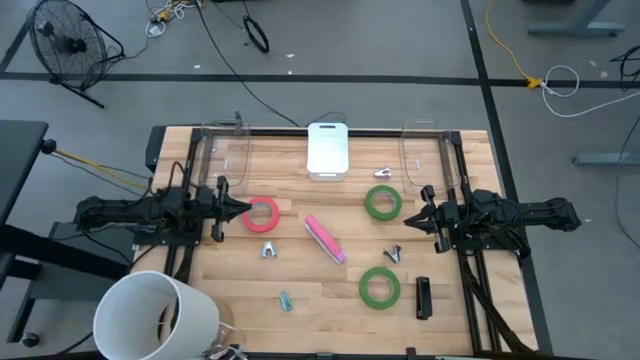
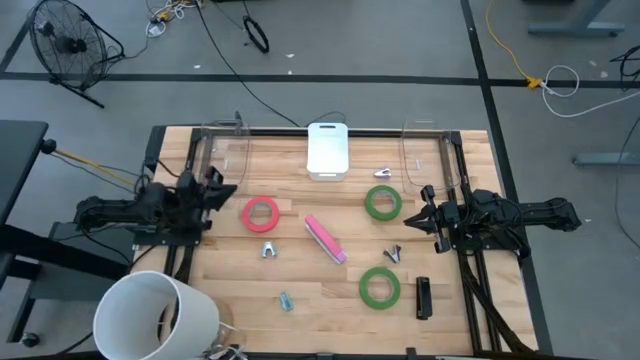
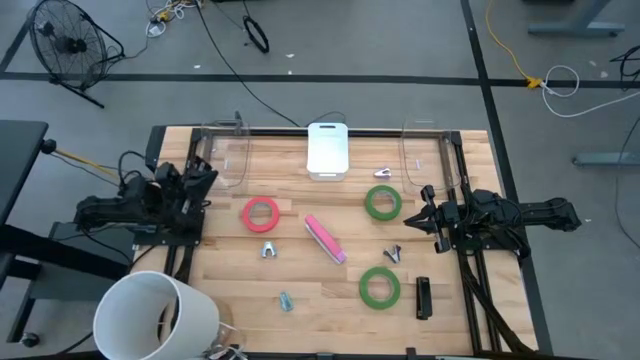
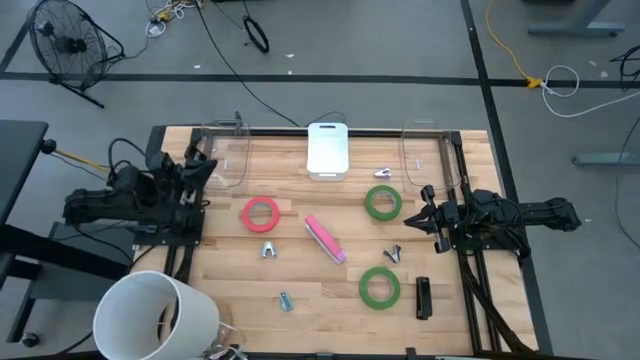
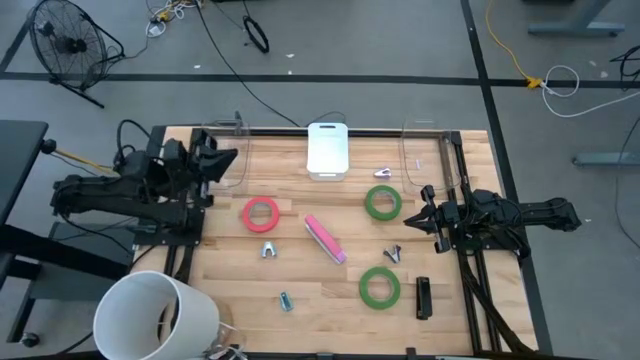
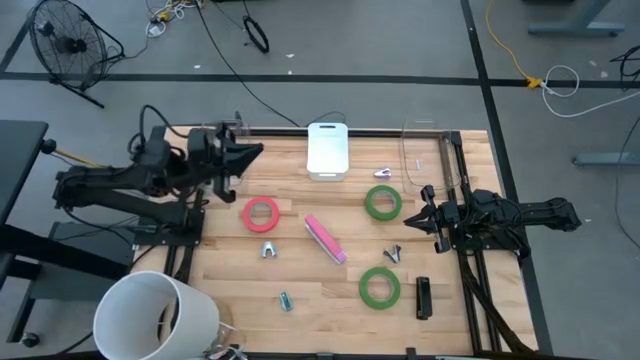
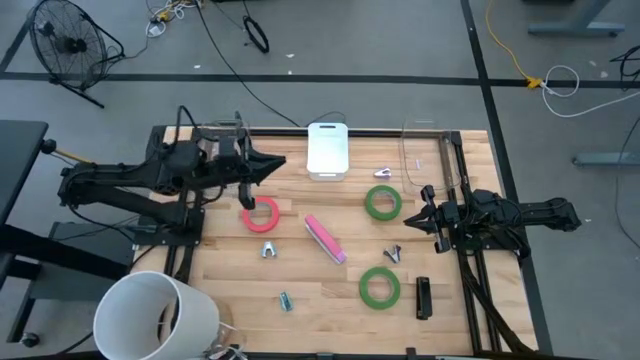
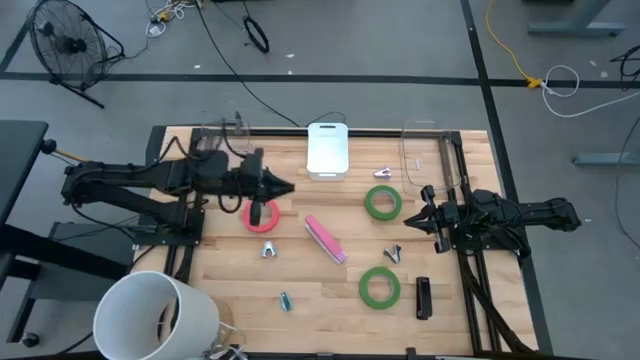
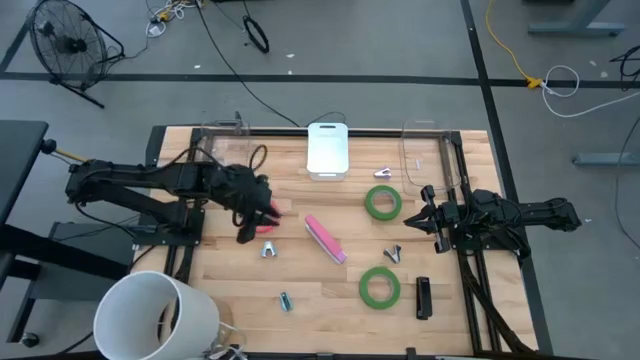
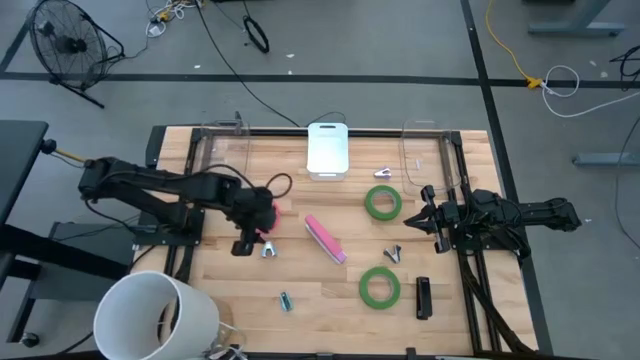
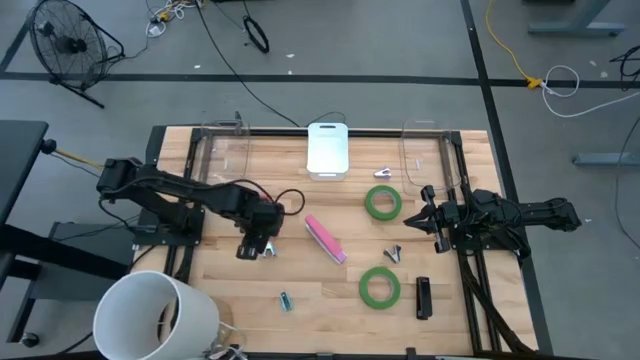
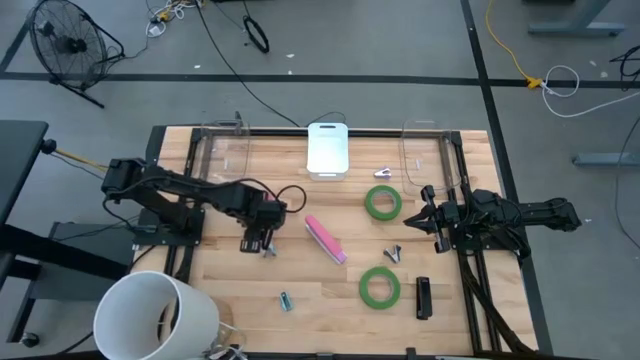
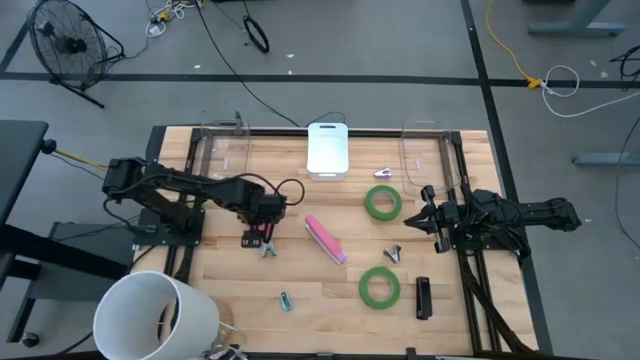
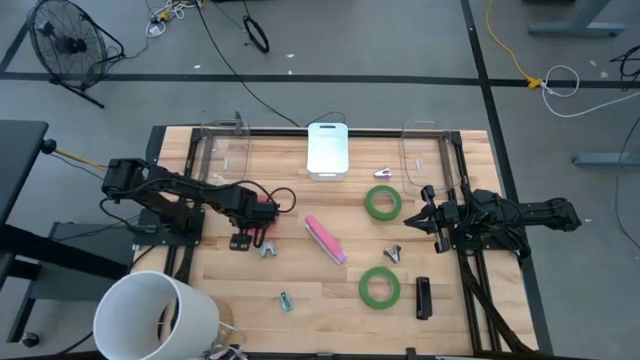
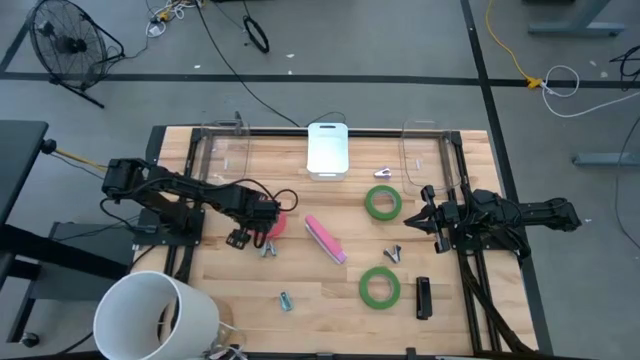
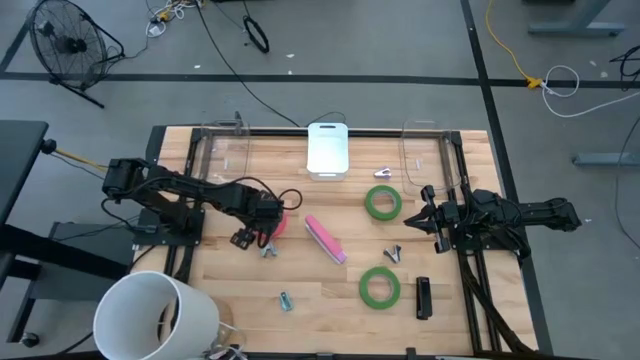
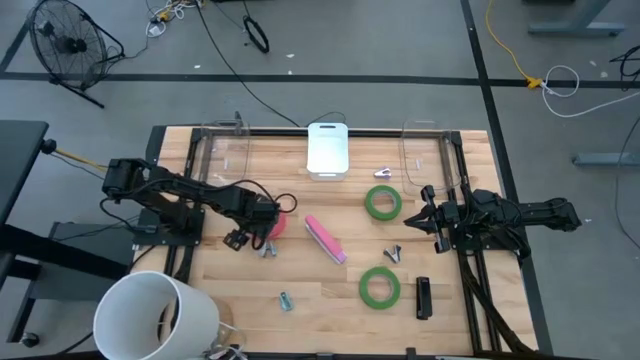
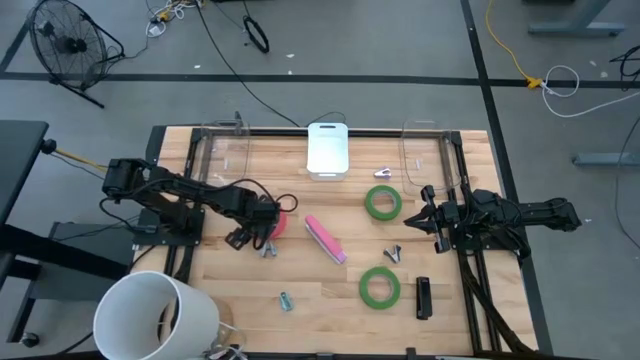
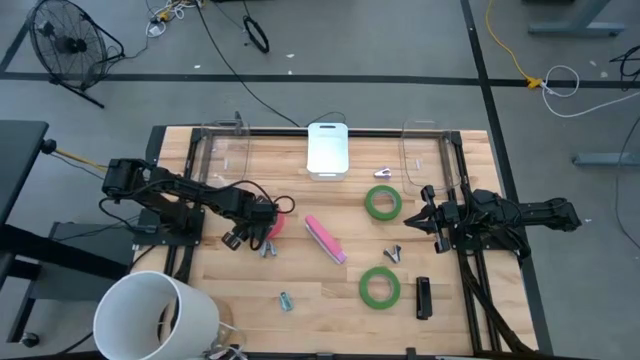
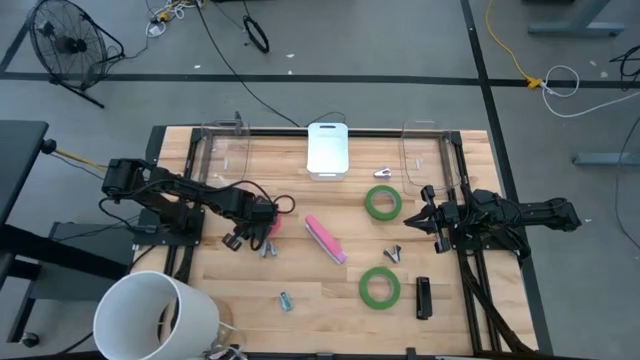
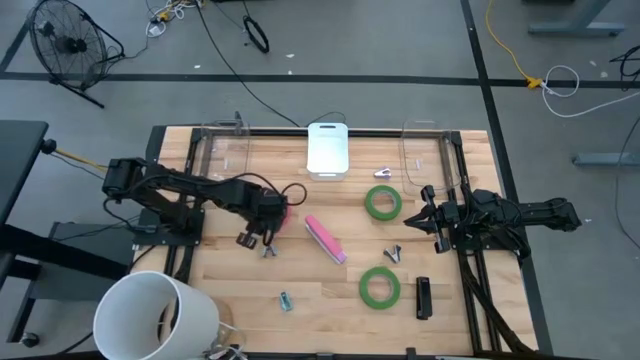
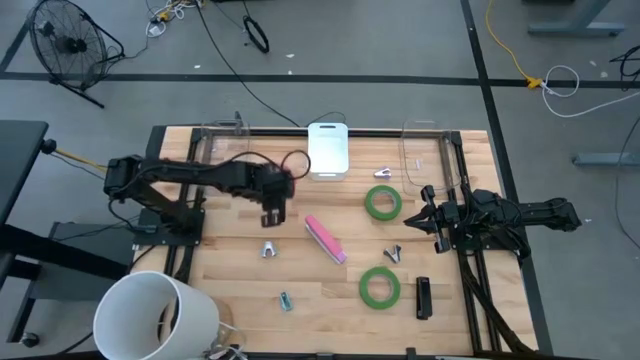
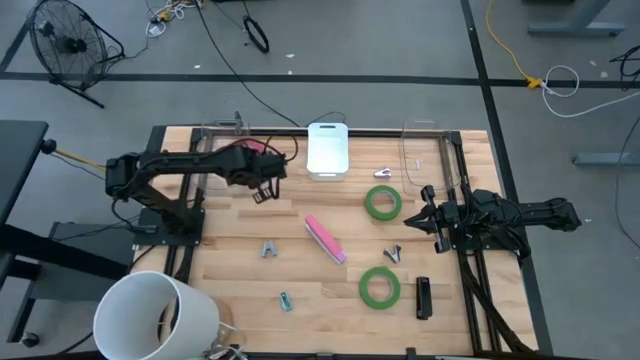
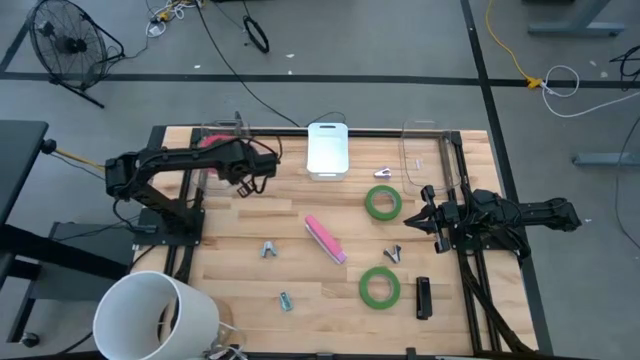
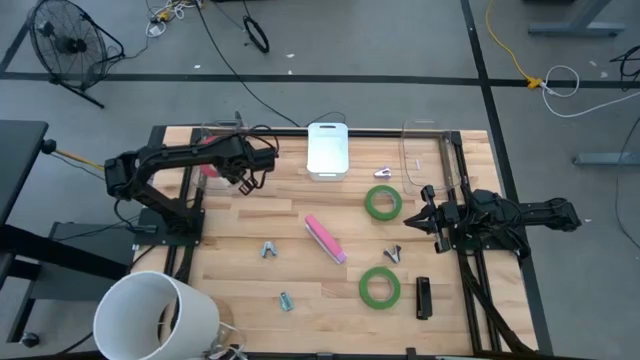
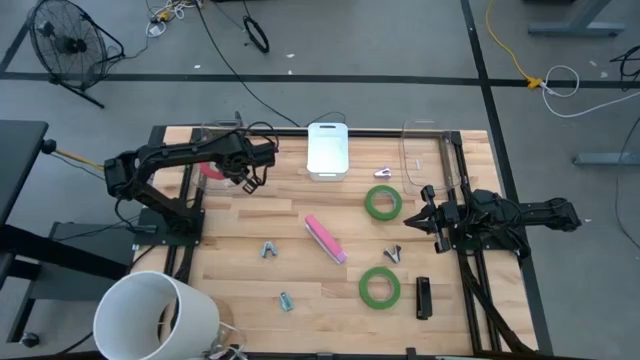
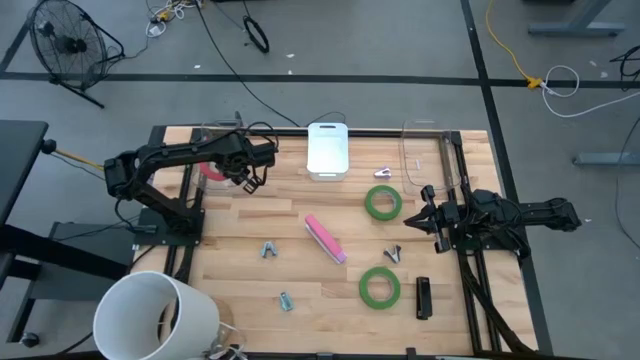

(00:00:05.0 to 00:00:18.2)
Task: Pick and place Stapler, Stapler remover, tape
Put the pink tape into the left transparent bin

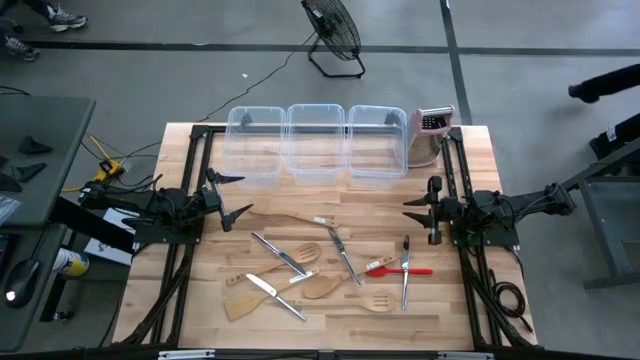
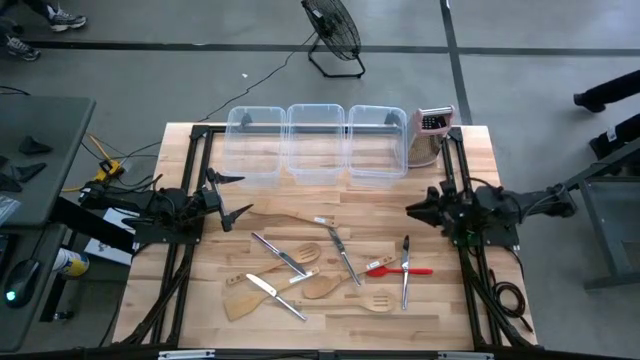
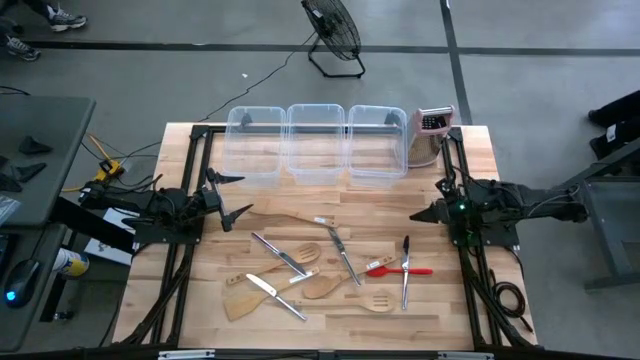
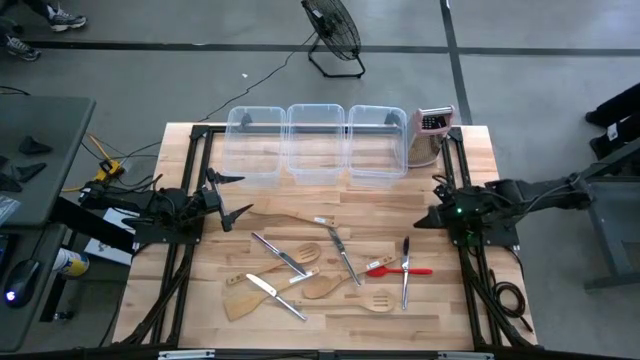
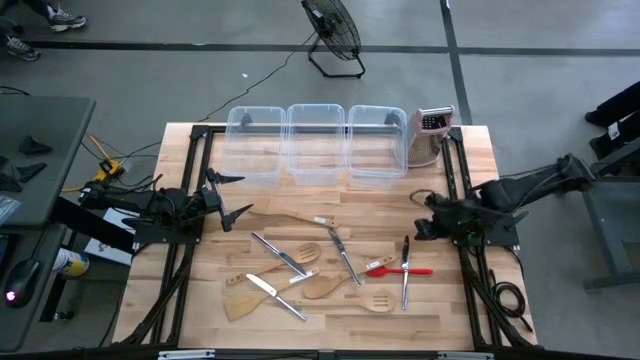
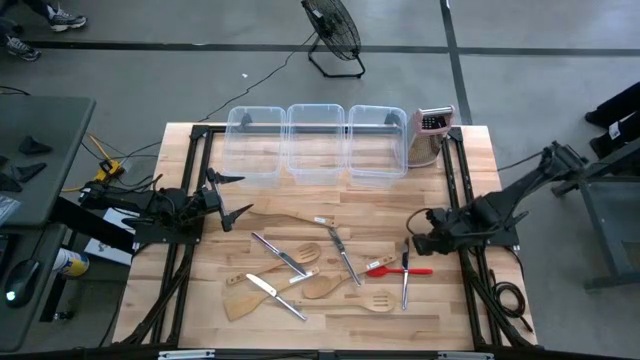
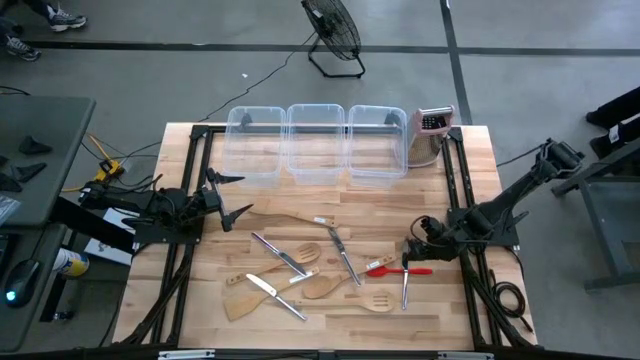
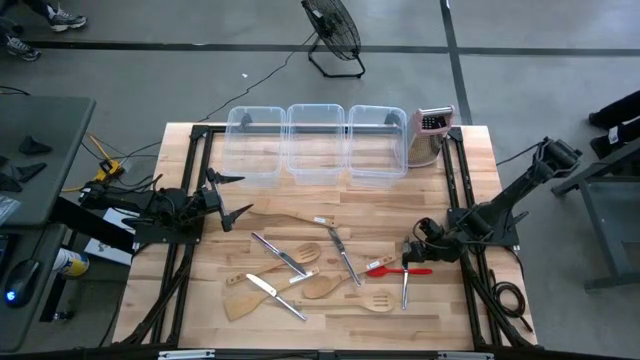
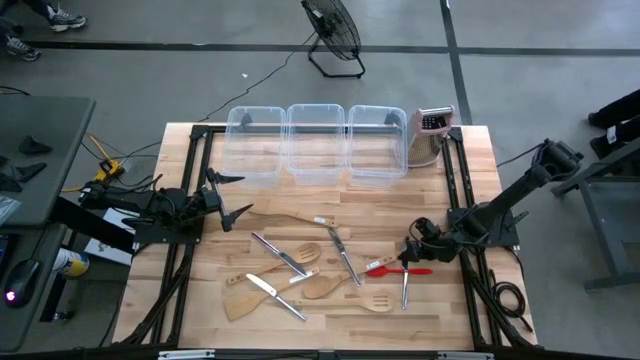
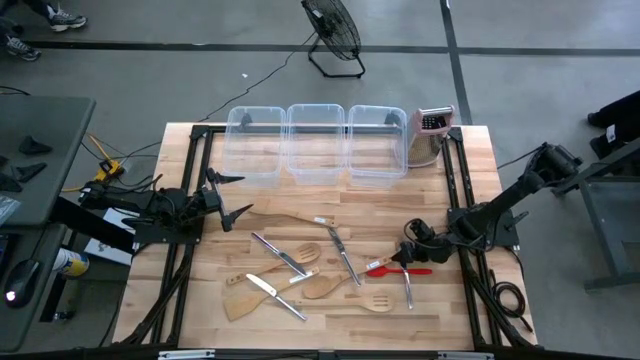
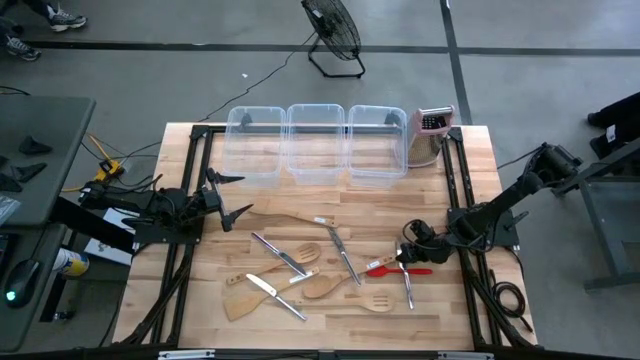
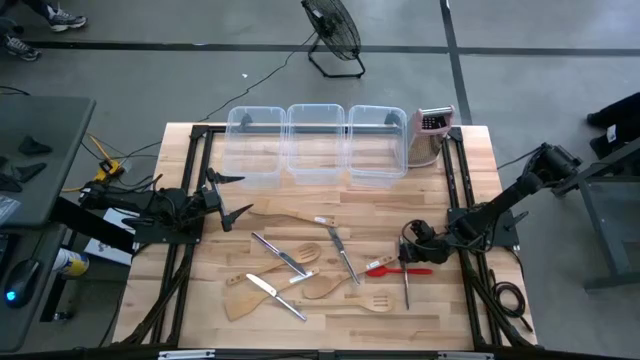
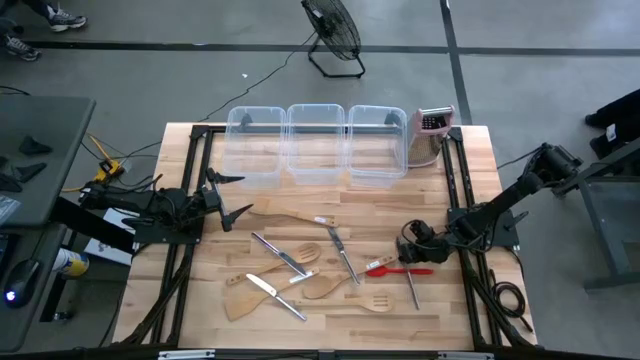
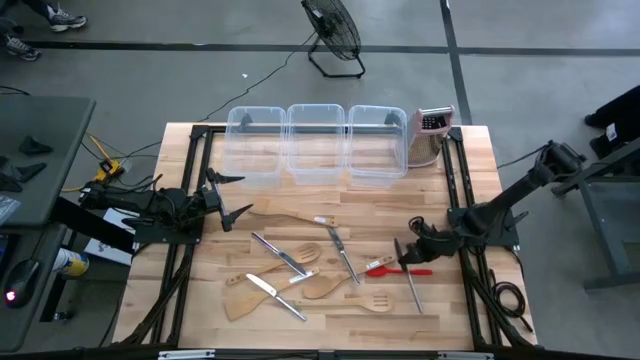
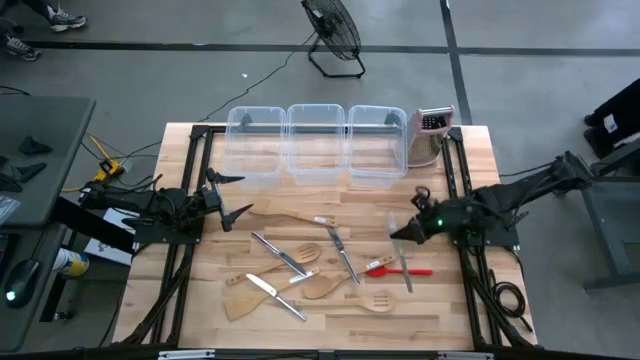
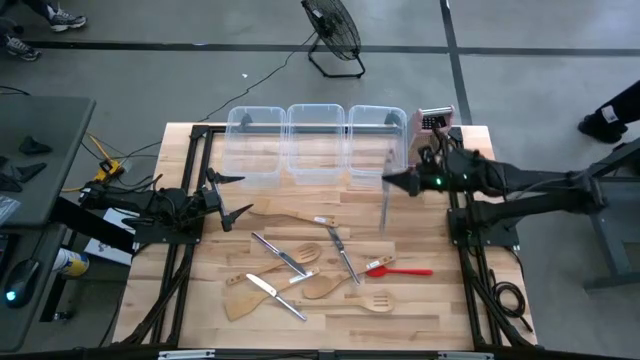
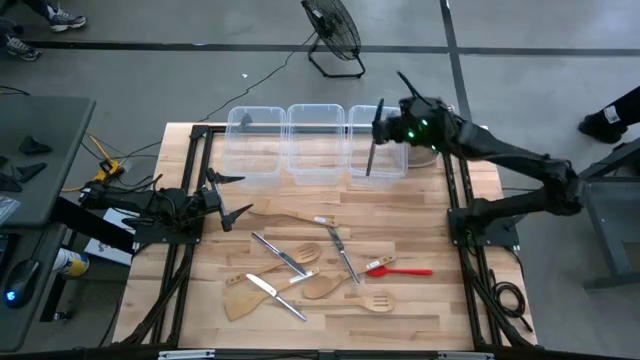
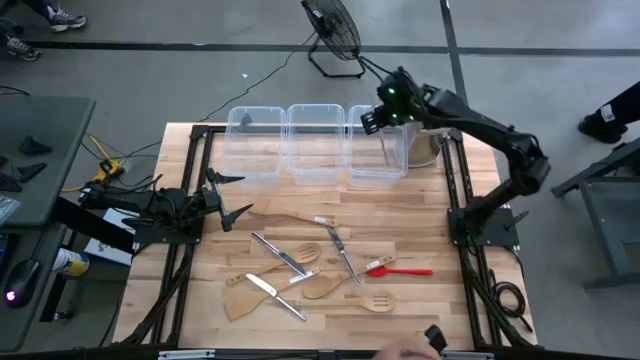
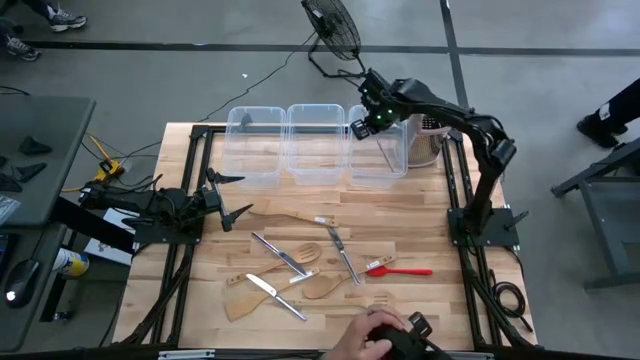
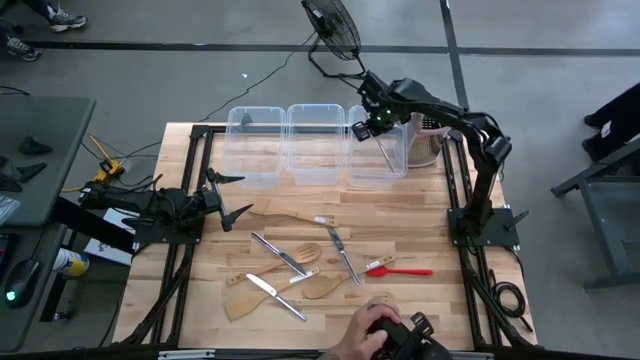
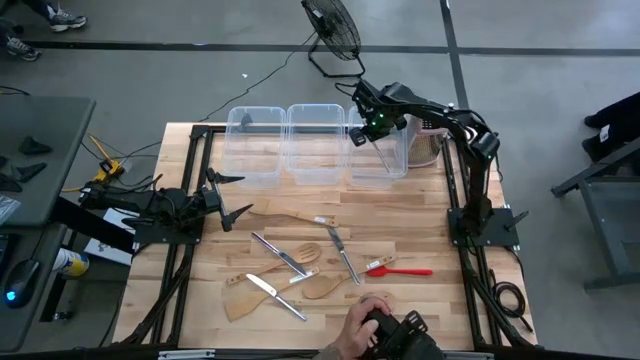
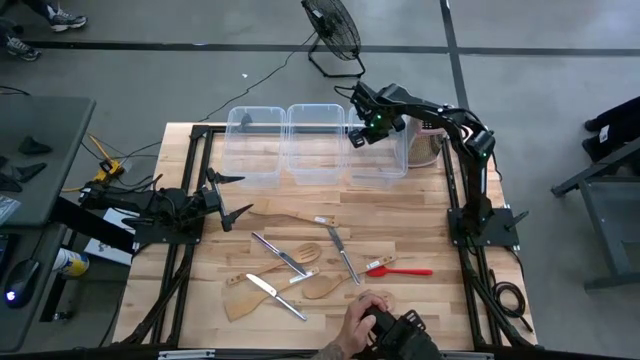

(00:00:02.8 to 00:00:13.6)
Task: Pick & Place Kitchen Items
Put the table knife into the right transparent bin
